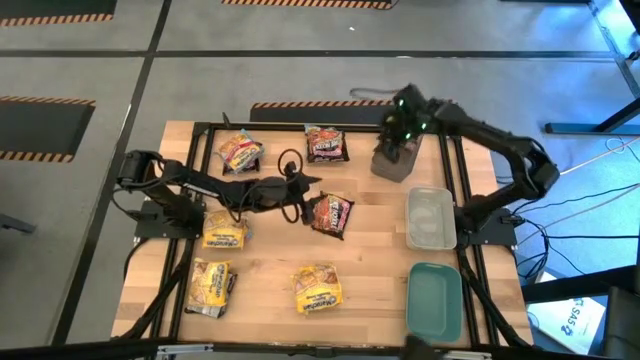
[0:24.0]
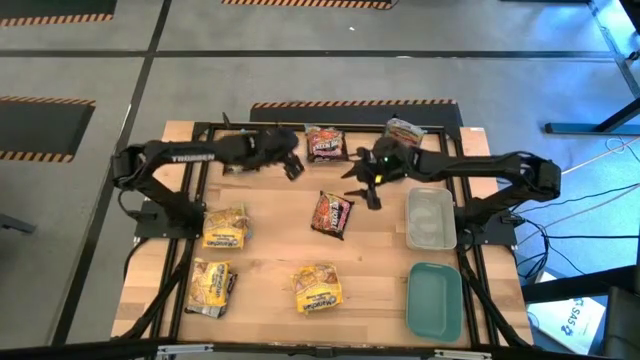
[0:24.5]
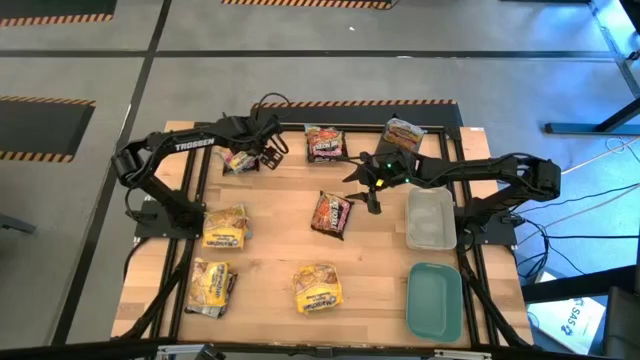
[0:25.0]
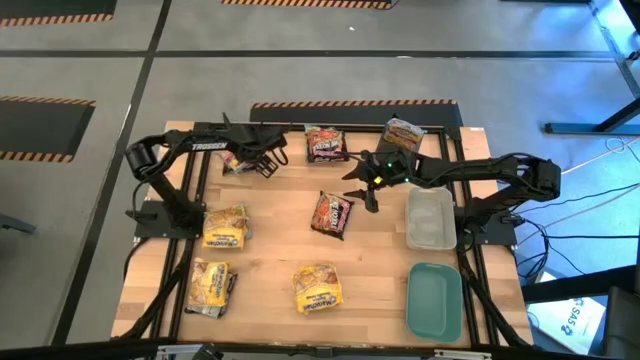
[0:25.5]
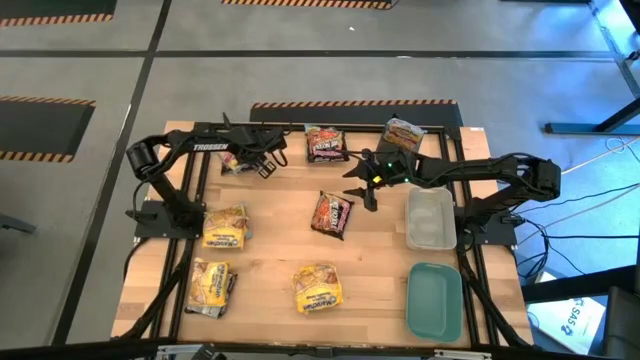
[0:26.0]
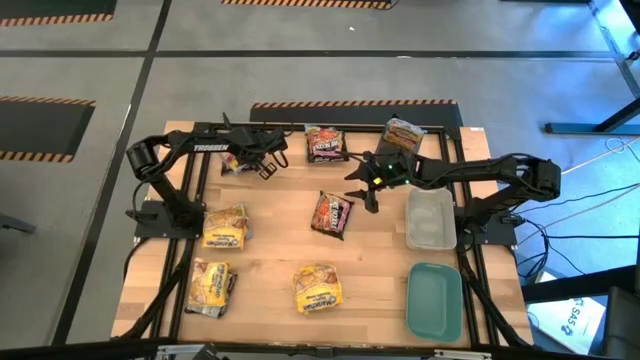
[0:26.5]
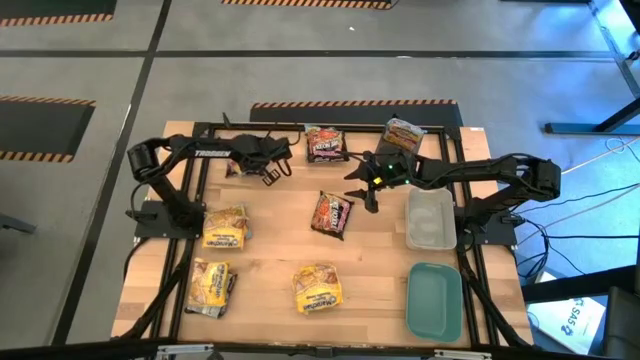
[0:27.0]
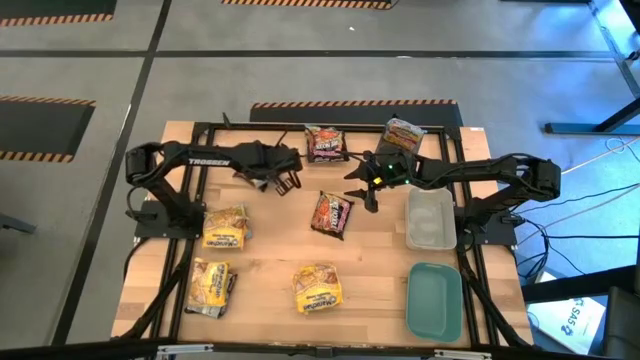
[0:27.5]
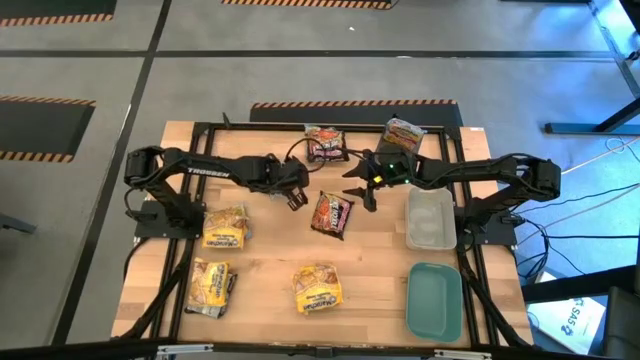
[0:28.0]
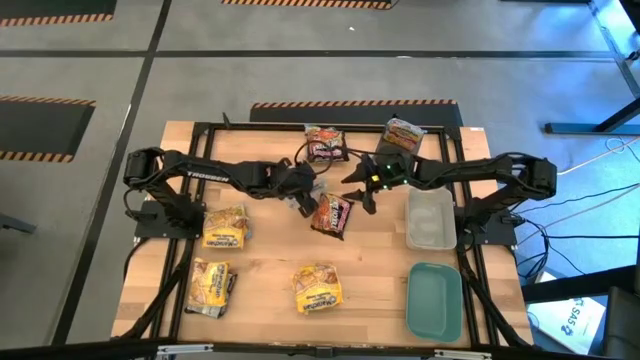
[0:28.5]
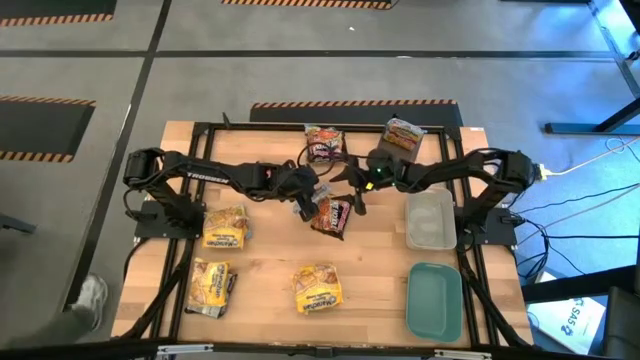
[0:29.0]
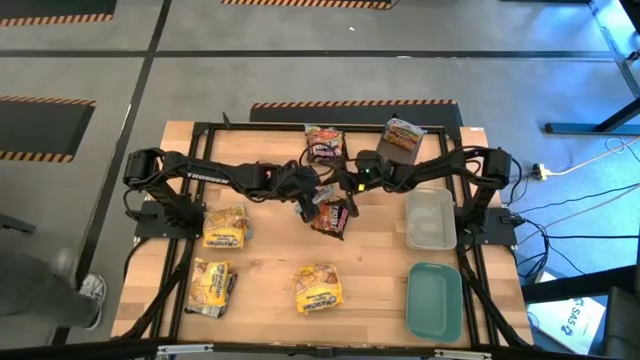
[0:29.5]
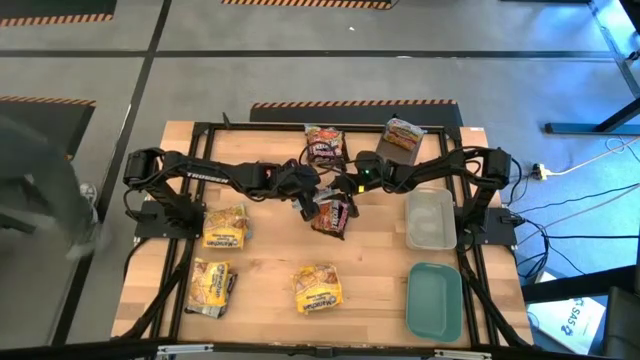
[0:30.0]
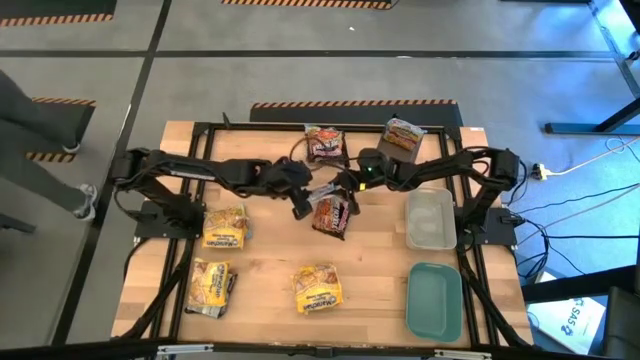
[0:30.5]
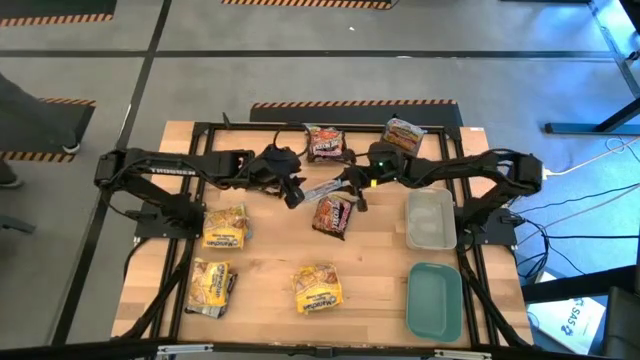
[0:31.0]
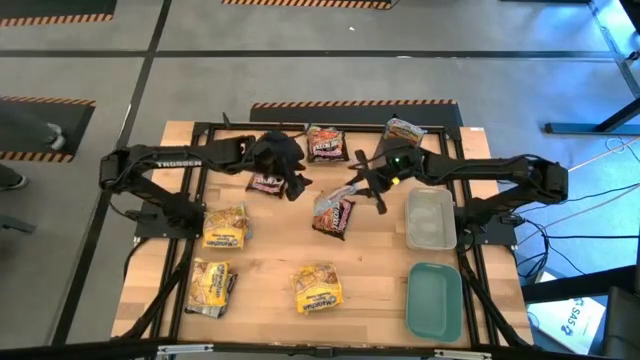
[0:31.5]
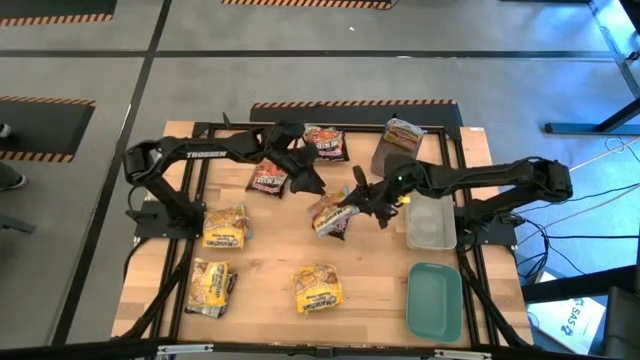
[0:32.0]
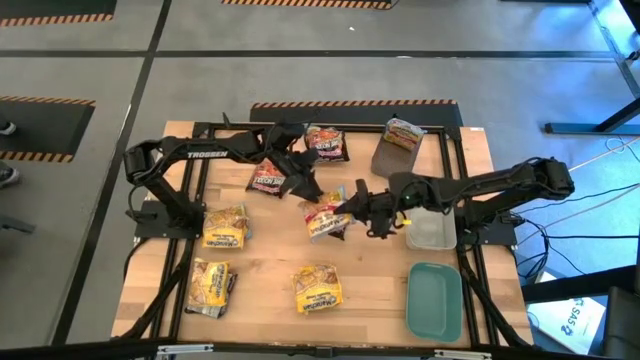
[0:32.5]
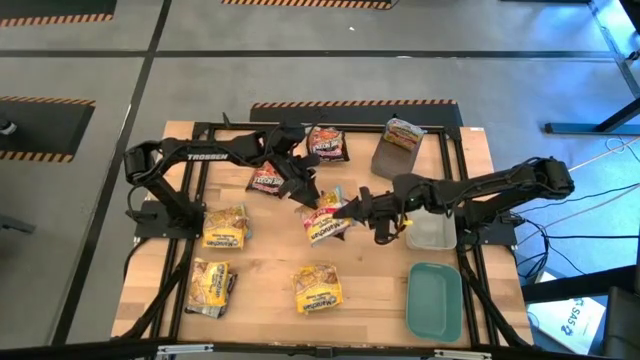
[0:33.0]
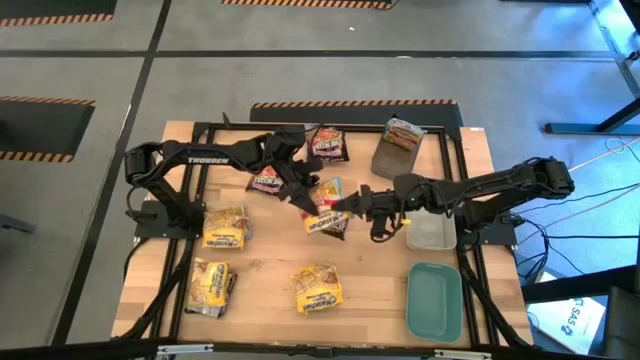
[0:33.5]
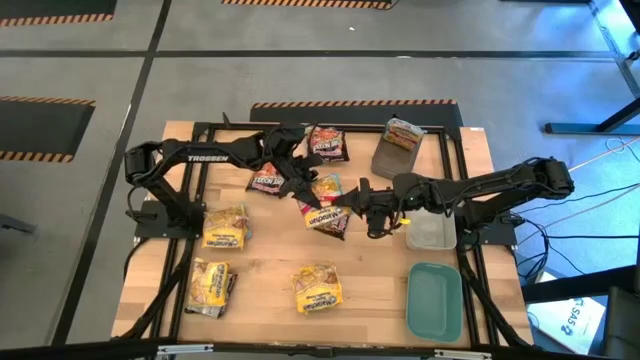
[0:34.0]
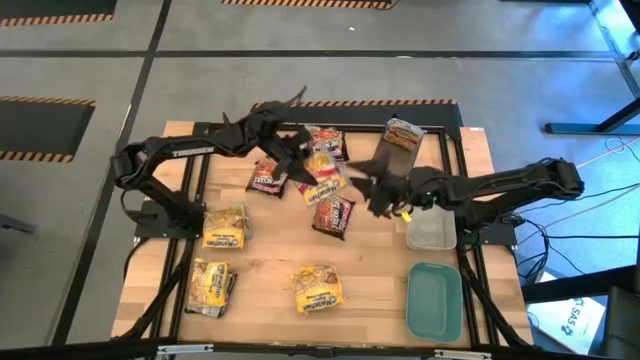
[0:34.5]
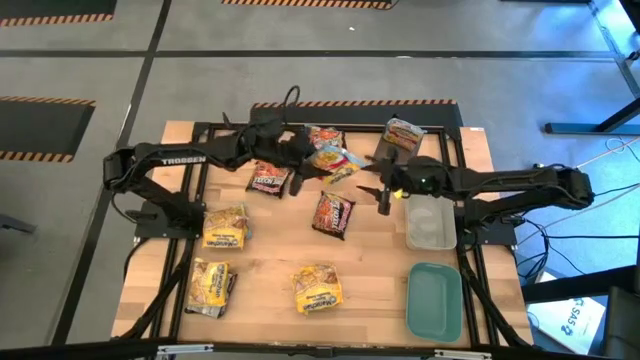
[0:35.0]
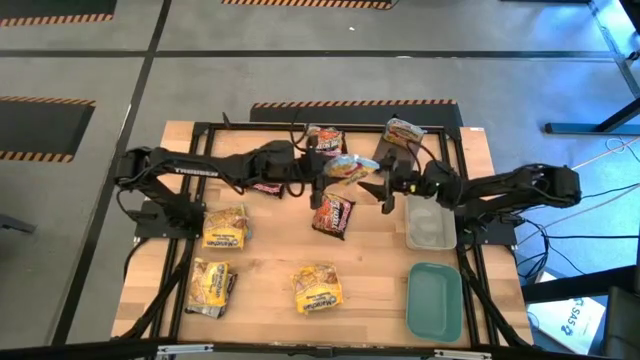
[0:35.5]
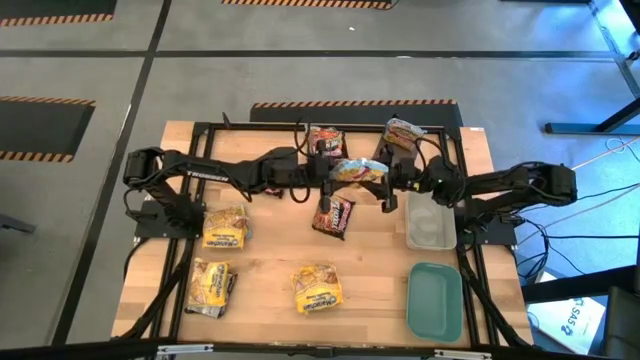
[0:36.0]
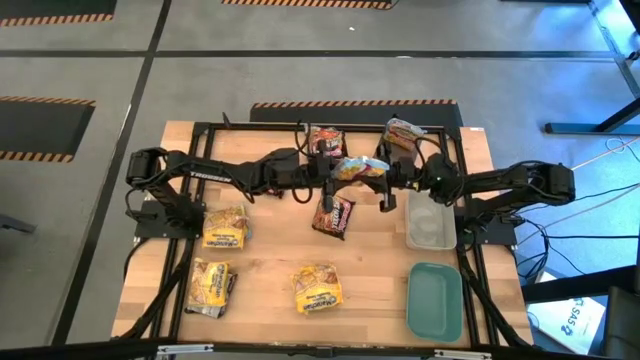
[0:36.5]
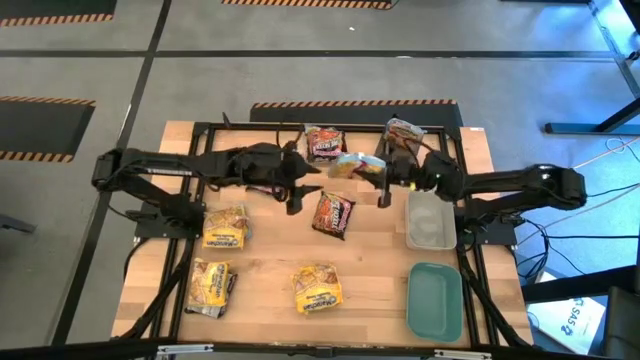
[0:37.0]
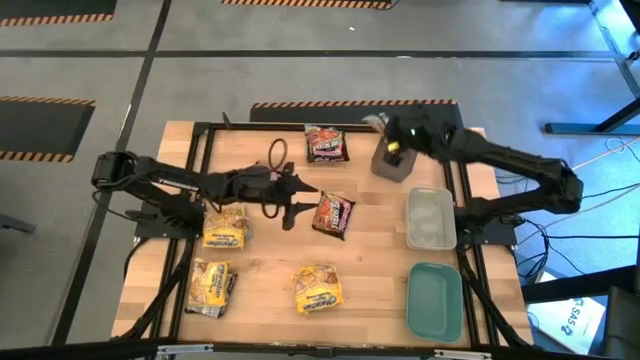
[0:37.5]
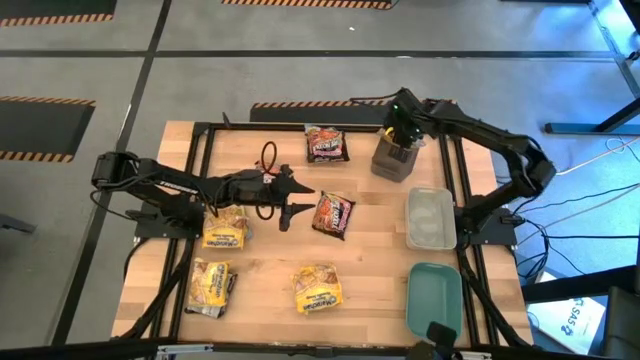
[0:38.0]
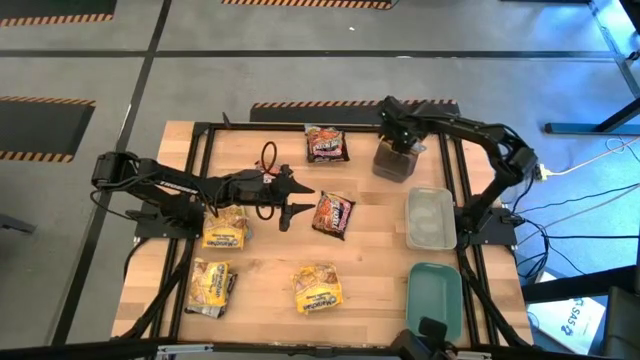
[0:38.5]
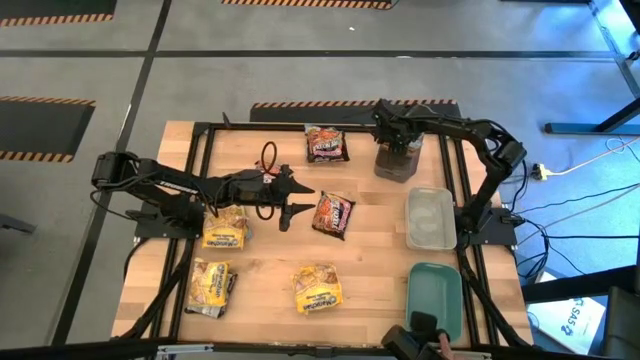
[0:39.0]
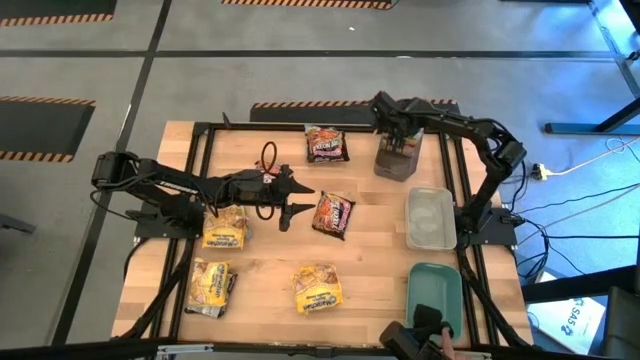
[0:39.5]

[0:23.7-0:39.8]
Task: Sort Maruchan noodles
Put the blue noodle pack into the black bin

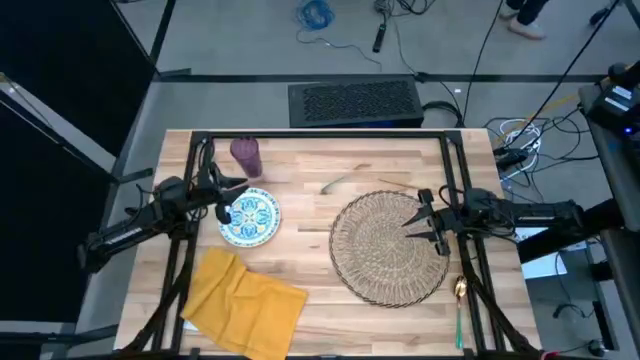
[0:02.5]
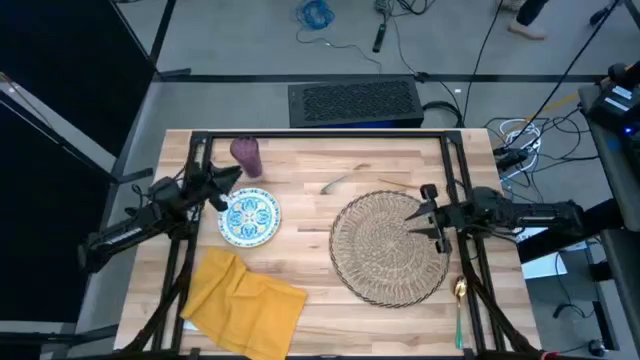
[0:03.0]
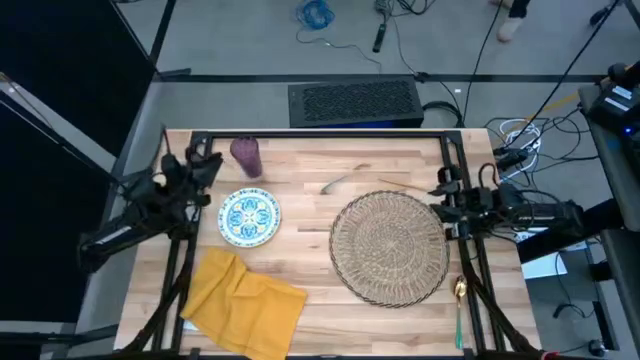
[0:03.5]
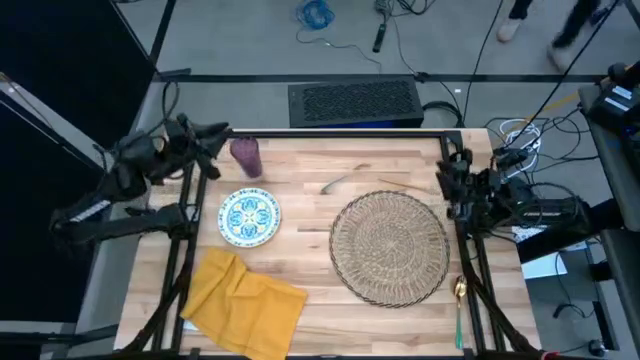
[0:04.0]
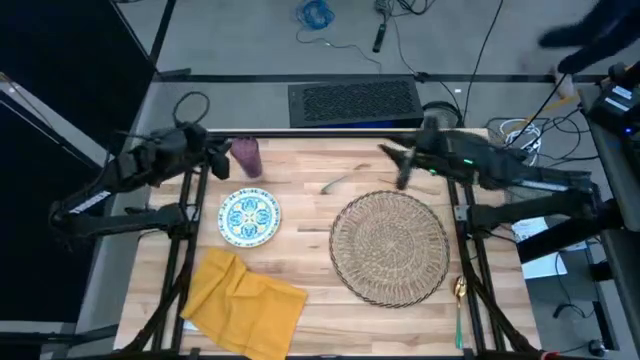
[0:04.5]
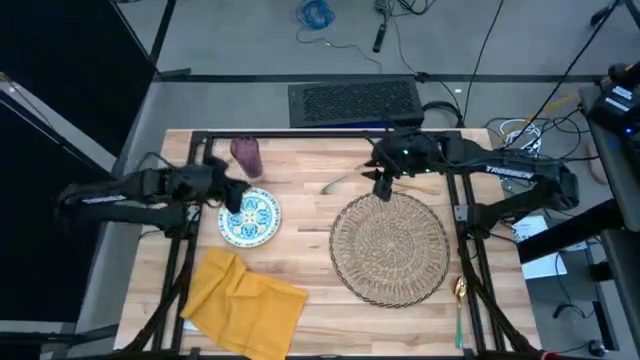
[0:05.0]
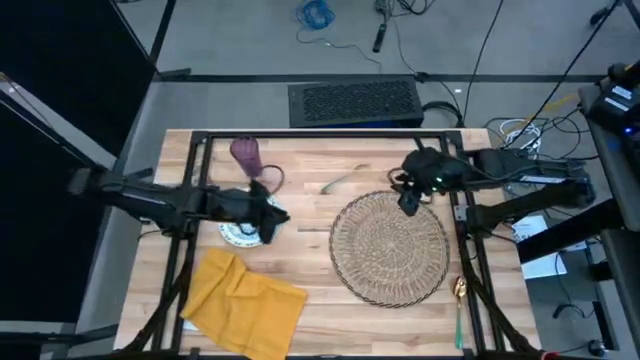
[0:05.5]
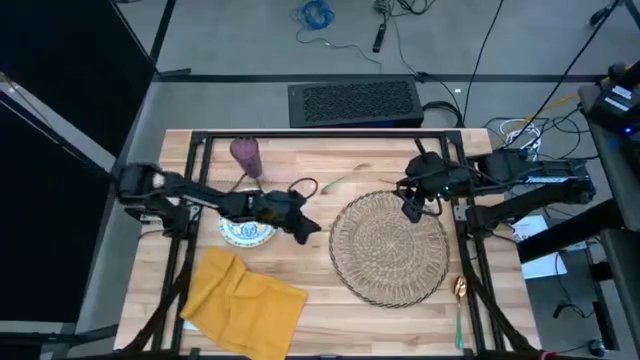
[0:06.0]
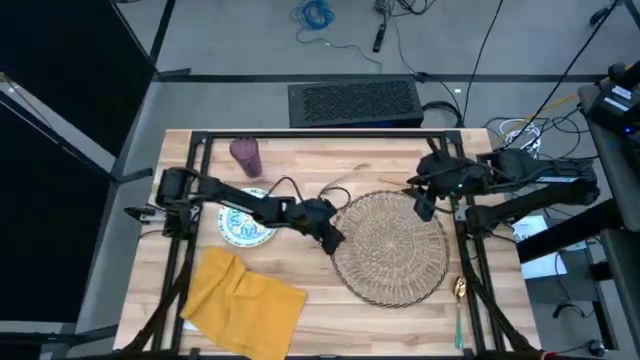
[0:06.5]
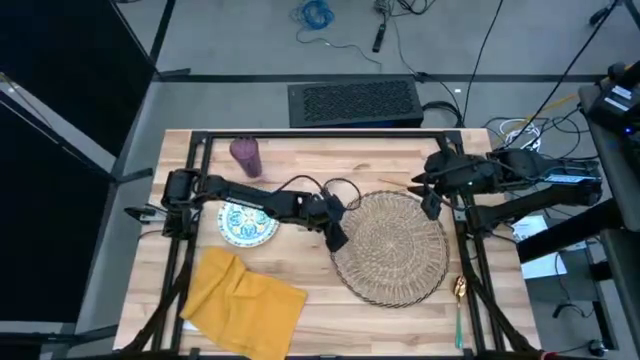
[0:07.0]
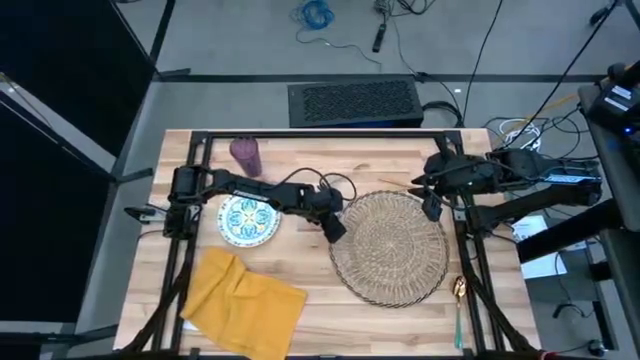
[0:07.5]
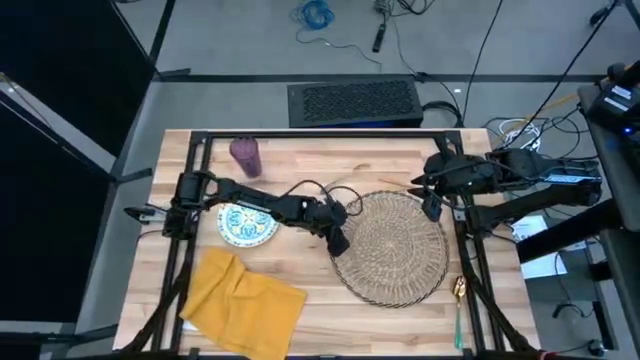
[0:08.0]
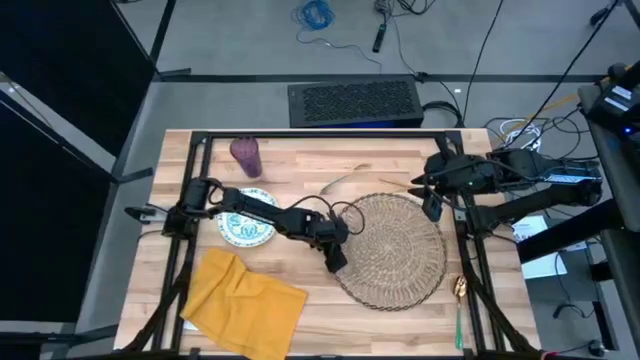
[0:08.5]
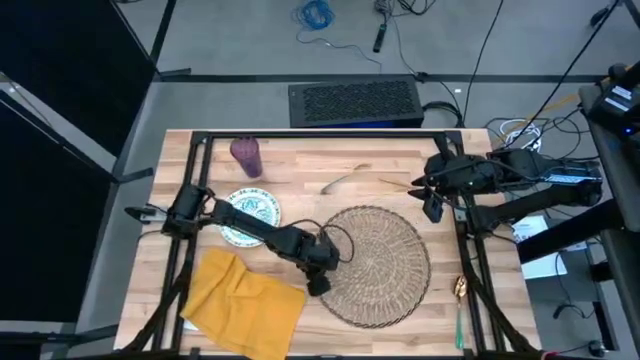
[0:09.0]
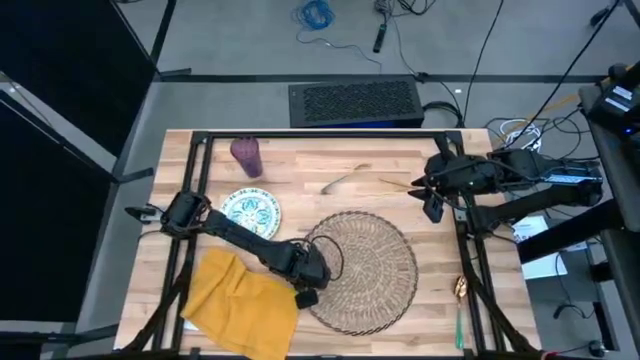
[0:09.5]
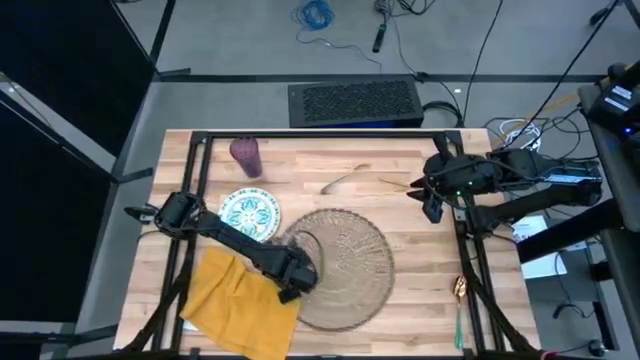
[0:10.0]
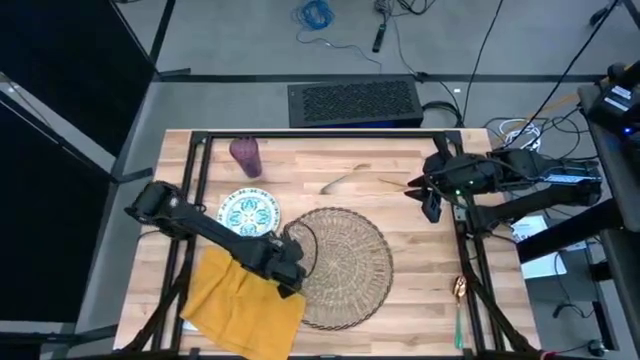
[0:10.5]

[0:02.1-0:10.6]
Task: Set table place
Move the brown placemat to the center of the table
